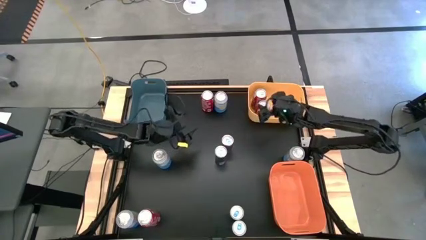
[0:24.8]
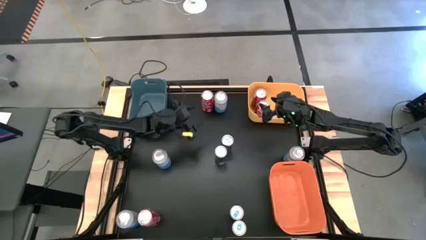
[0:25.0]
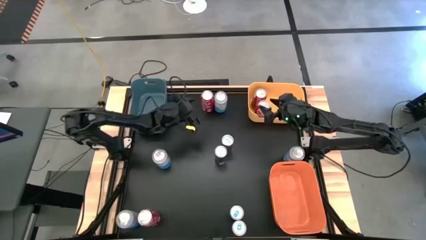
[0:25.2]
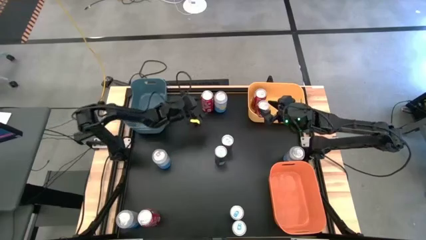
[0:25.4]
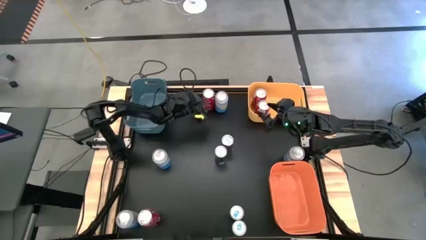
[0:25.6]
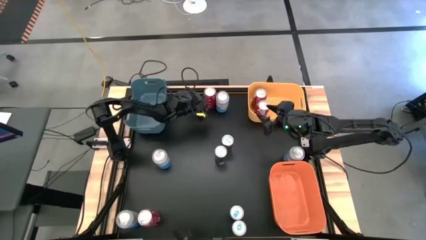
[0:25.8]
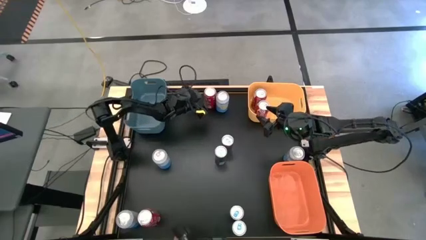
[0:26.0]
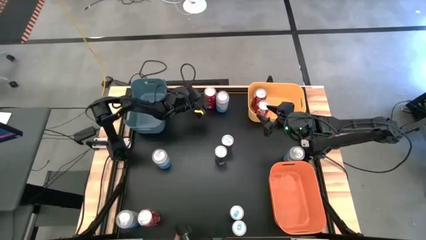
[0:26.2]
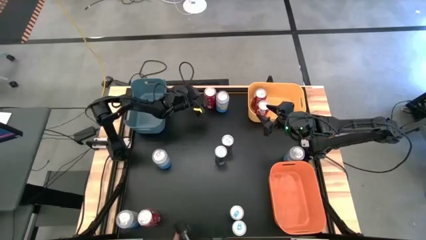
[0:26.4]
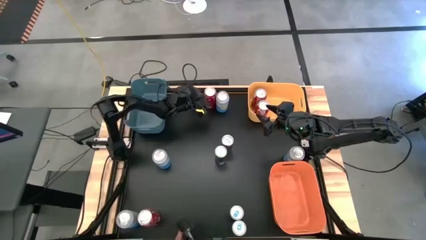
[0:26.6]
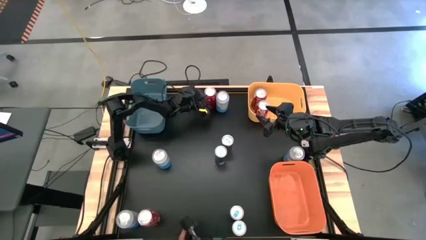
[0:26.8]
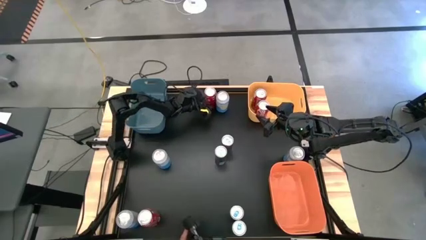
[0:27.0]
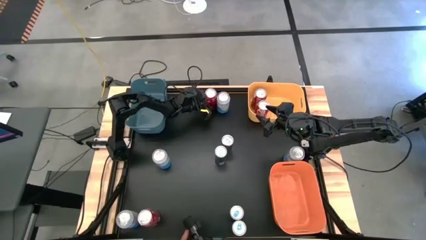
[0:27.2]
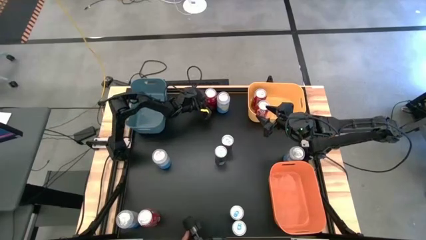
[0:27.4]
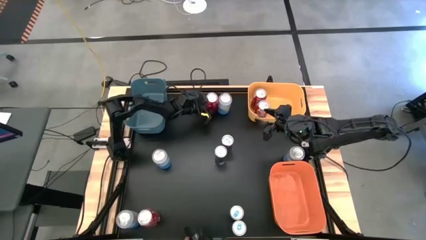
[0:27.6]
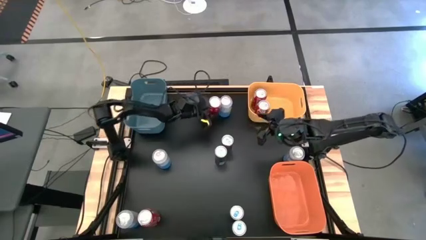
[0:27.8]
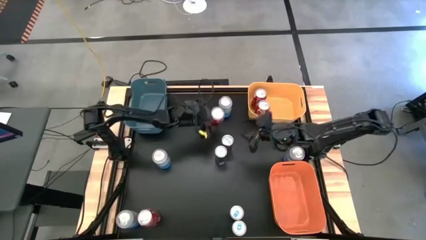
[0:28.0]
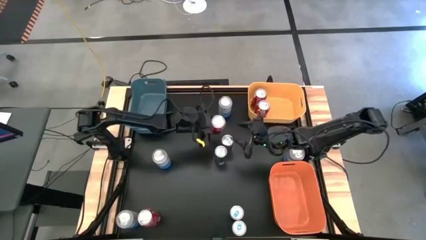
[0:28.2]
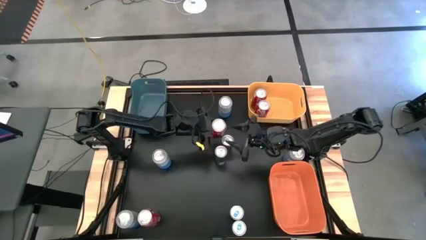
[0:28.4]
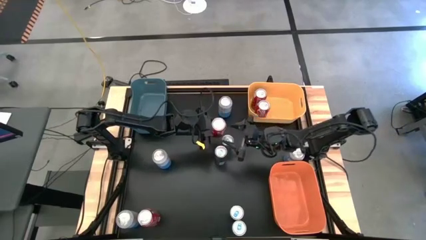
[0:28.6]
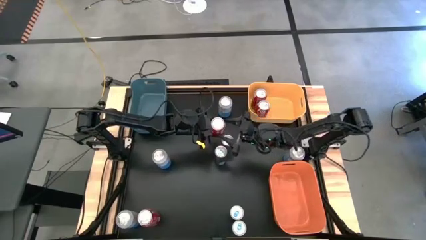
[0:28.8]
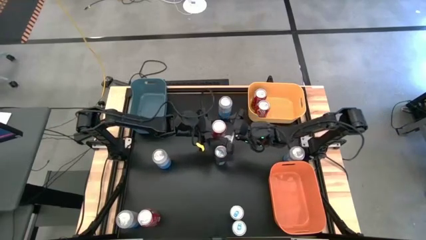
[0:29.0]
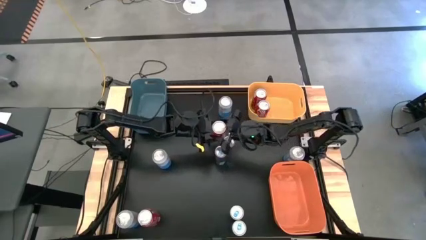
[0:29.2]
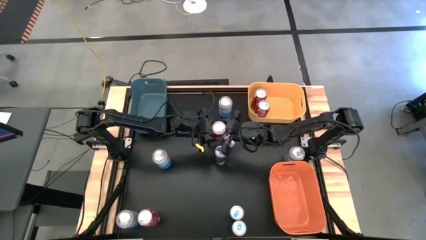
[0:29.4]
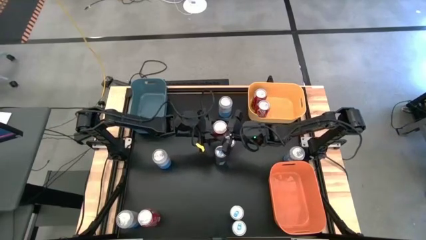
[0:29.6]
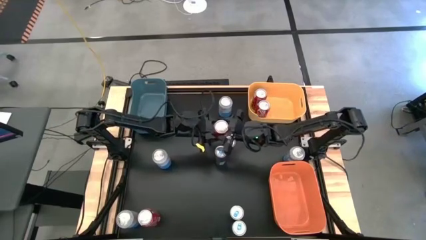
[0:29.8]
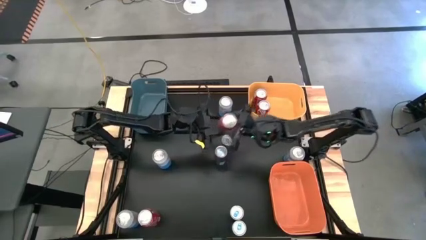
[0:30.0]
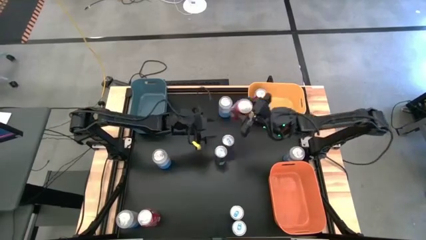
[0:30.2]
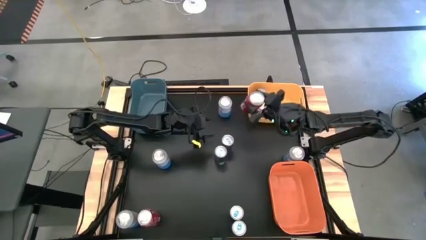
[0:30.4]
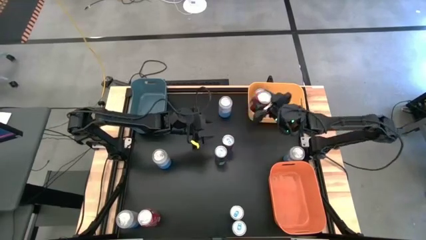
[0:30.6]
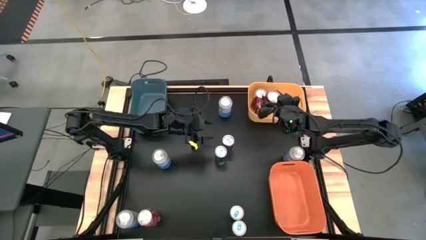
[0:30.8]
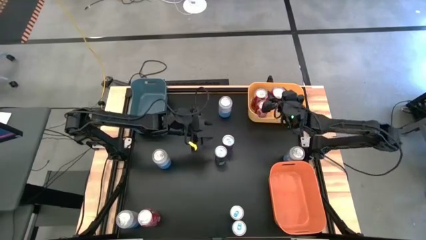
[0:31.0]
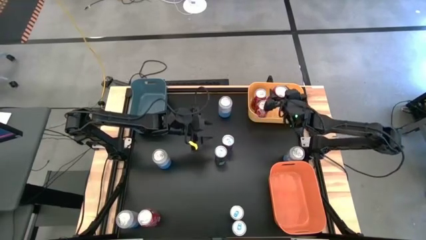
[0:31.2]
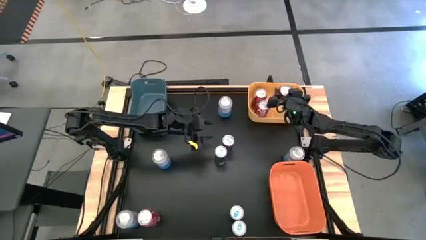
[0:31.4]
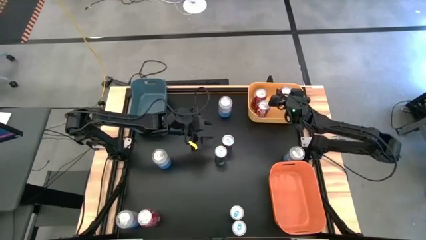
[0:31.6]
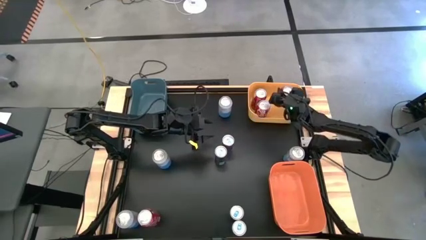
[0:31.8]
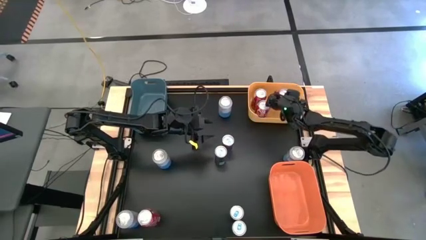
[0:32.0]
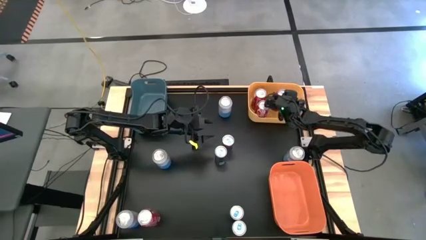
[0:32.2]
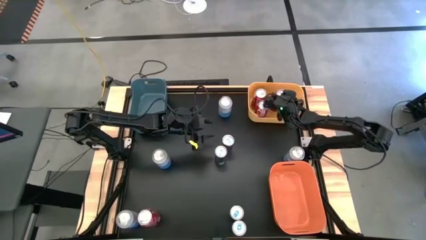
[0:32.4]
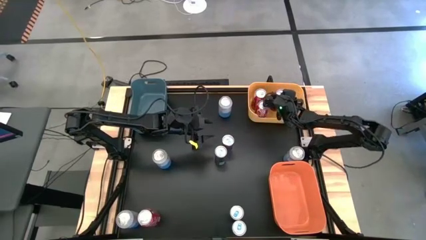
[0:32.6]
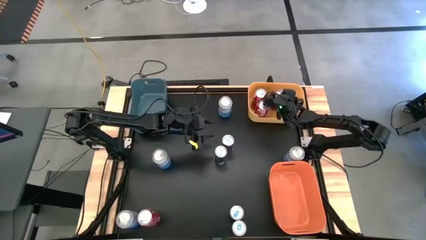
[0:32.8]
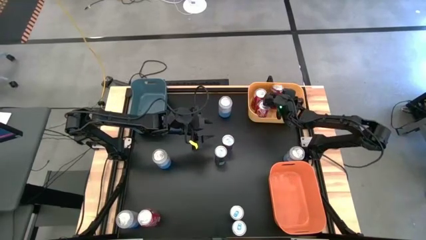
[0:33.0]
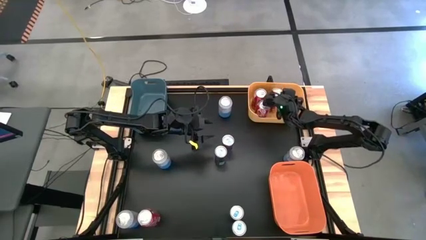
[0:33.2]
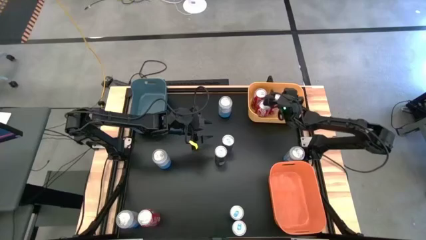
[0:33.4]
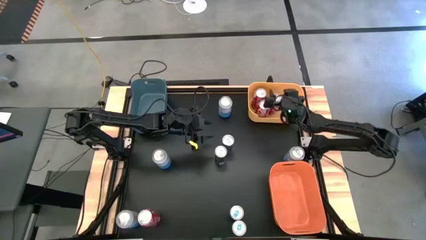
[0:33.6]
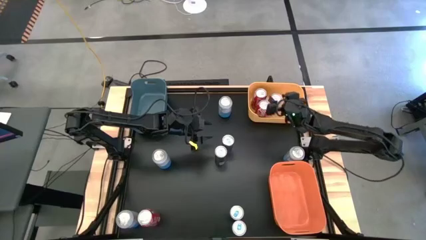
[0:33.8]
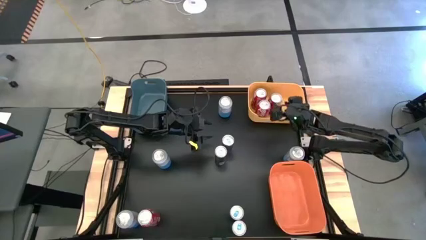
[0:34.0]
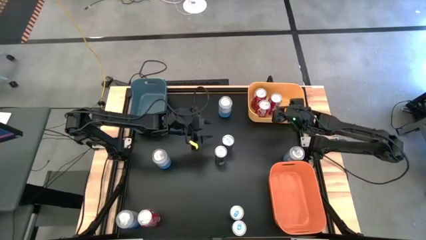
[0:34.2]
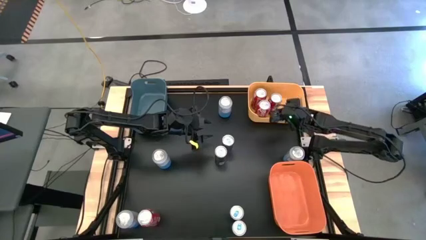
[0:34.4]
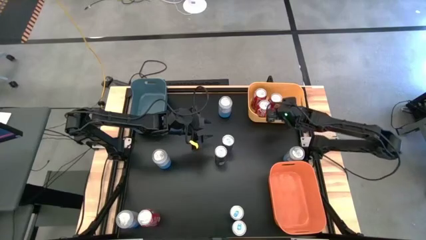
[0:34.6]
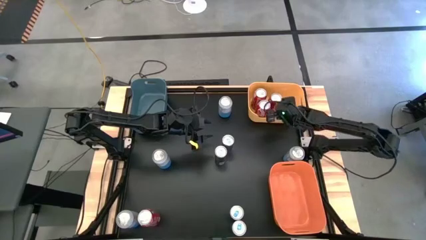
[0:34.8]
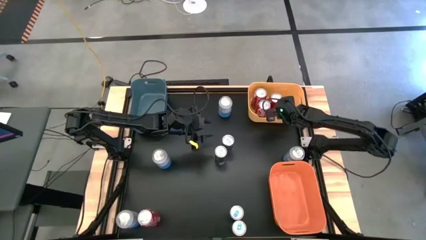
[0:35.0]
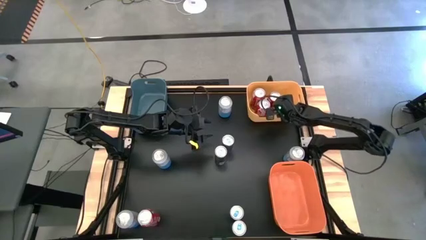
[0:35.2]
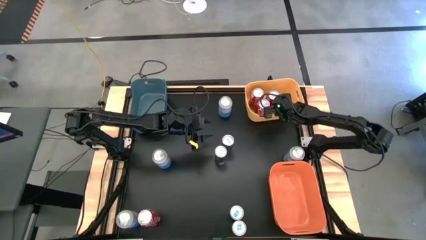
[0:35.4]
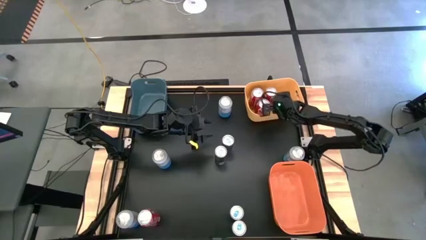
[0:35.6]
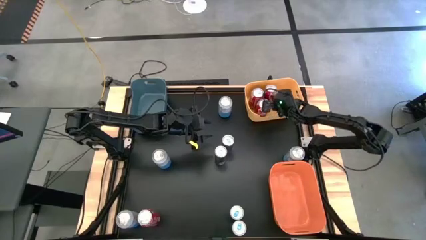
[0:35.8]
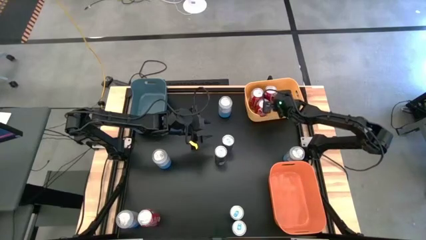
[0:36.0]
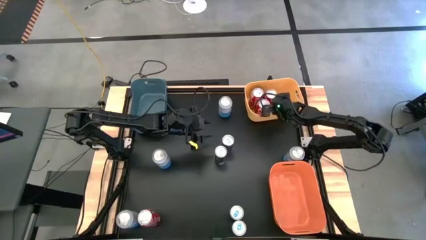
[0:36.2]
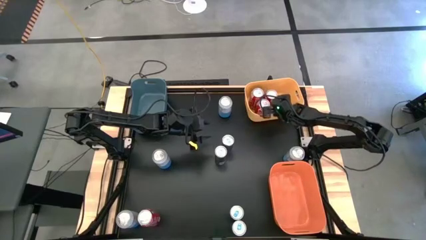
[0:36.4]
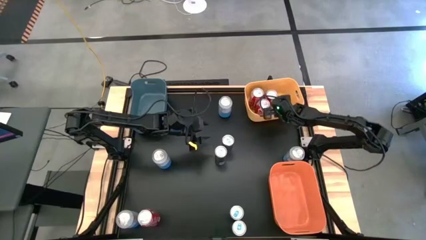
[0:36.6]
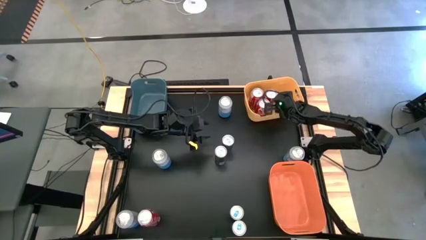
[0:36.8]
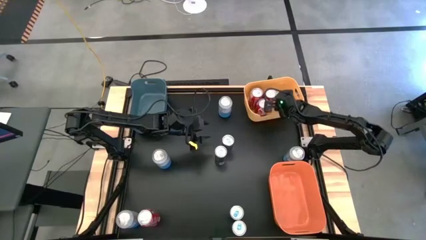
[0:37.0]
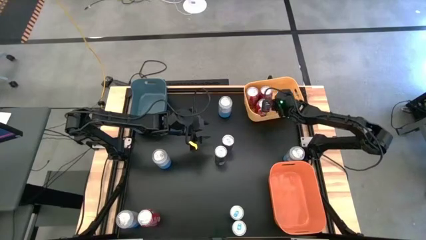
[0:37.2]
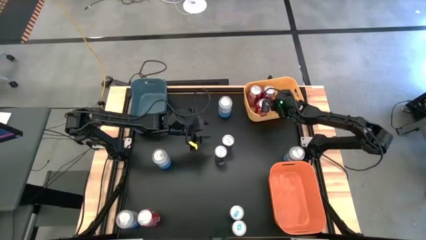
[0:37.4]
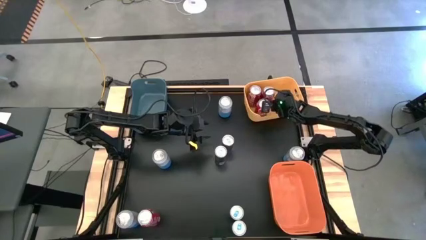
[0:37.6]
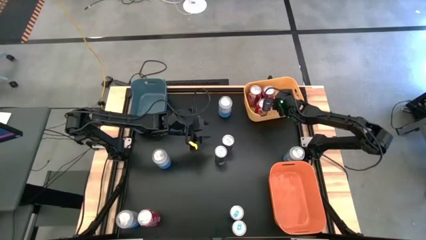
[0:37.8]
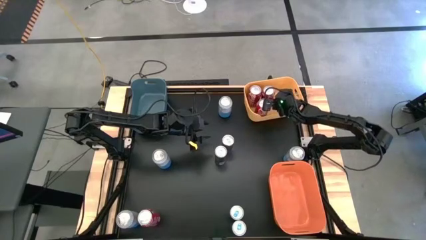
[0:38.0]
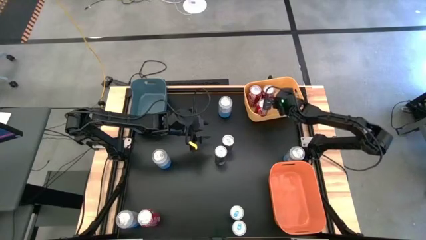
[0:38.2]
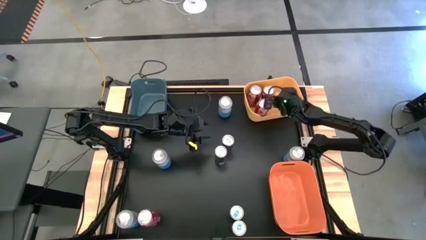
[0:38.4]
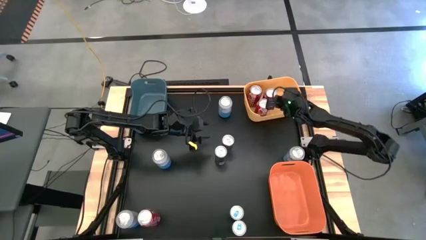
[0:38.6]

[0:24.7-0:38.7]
Task: Sort soda cans
Put the top red soda can into the yellow bin
